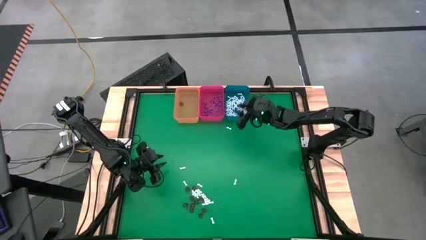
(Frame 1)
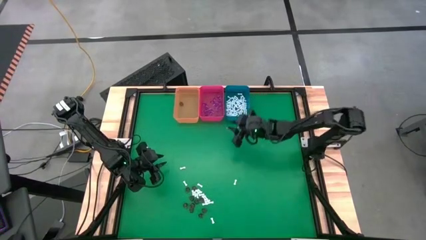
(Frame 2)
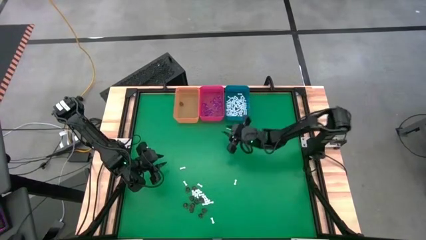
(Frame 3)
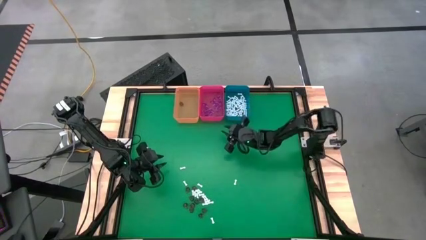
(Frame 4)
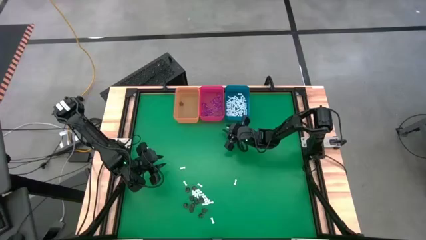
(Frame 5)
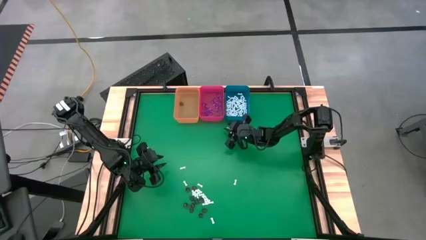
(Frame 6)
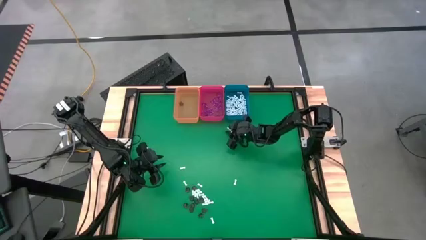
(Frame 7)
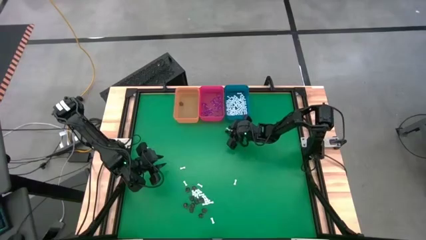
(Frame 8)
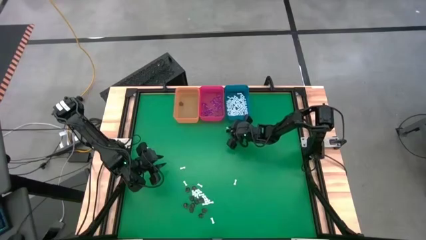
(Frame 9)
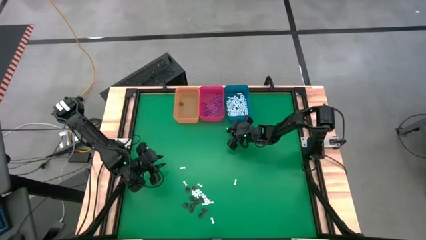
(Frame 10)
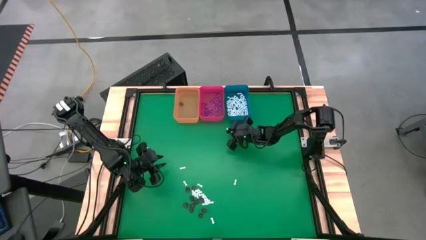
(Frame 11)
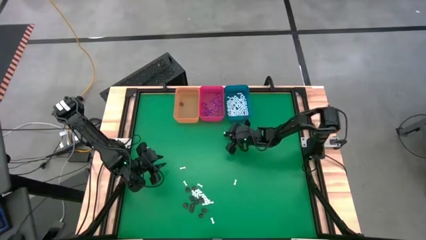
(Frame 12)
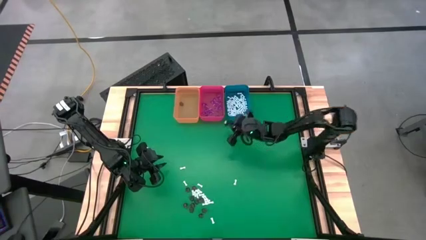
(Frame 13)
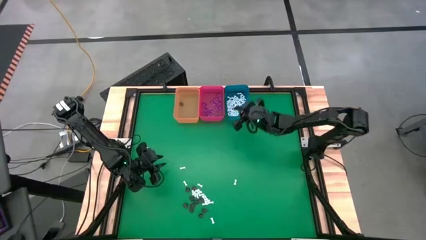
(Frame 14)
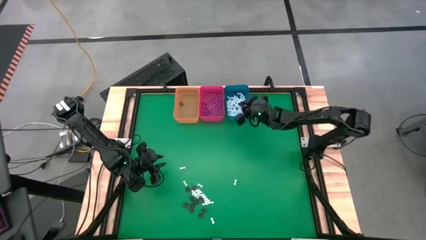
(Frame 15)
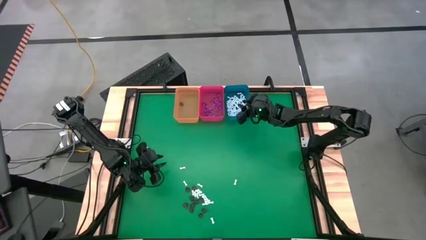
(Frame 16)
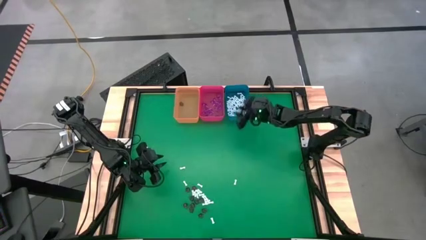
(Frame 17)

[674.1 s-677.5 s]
Task: Sort Halloween decoration
Put the white bone toy into the blue bin

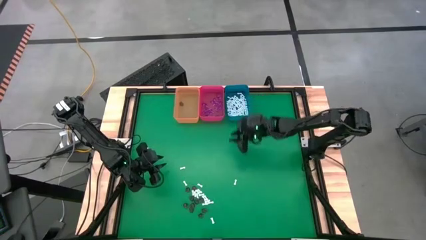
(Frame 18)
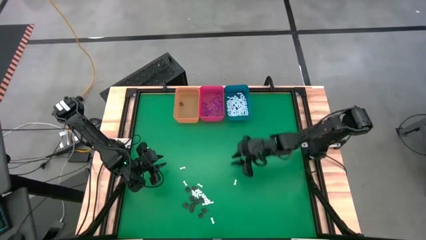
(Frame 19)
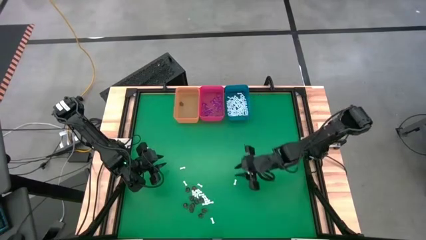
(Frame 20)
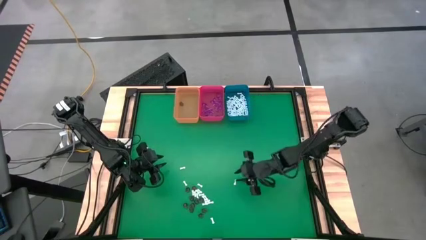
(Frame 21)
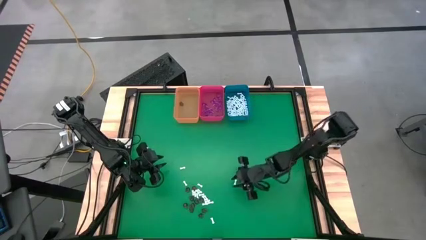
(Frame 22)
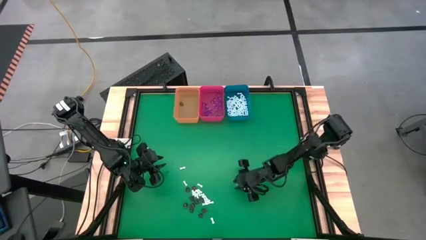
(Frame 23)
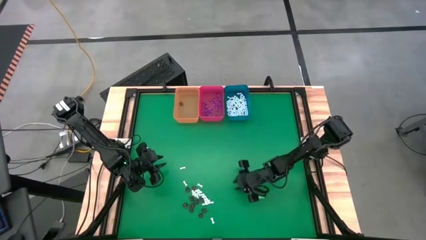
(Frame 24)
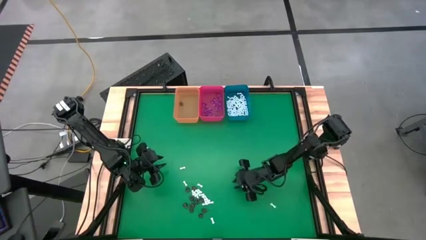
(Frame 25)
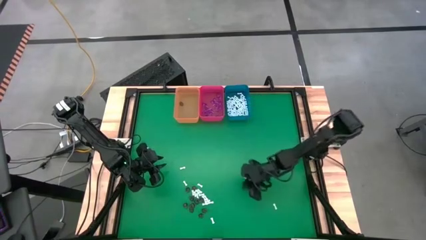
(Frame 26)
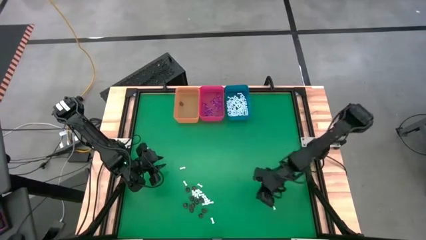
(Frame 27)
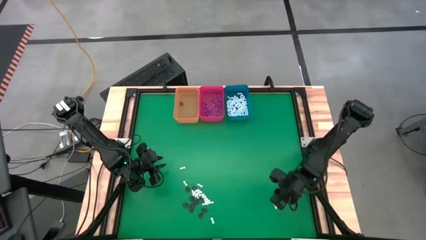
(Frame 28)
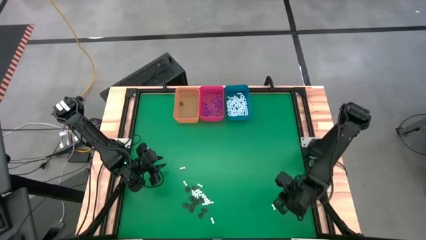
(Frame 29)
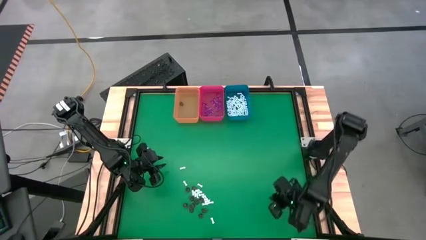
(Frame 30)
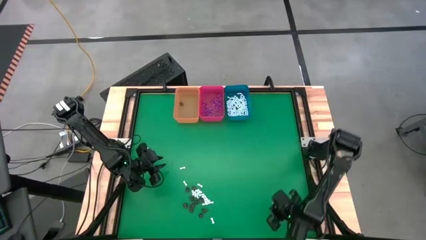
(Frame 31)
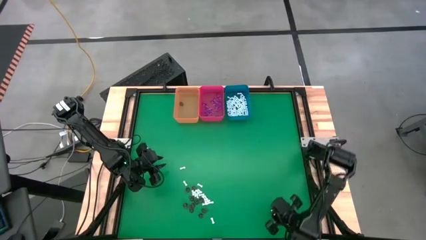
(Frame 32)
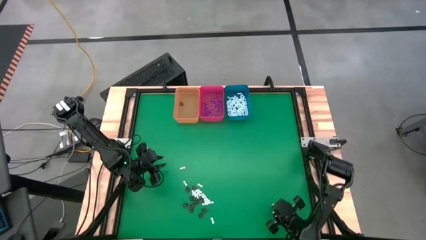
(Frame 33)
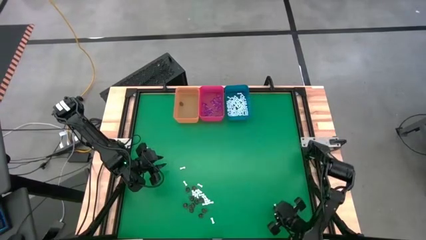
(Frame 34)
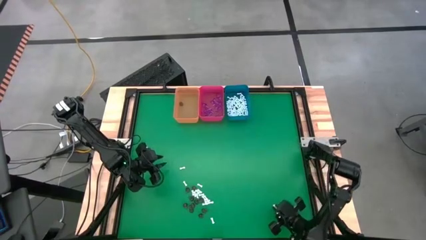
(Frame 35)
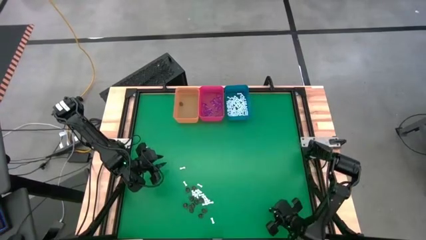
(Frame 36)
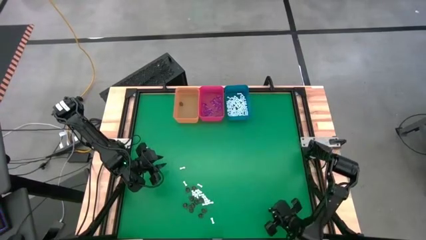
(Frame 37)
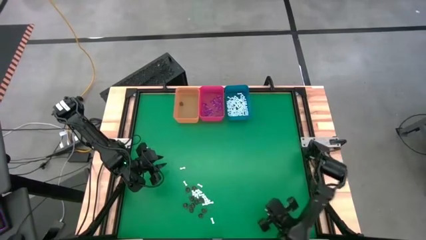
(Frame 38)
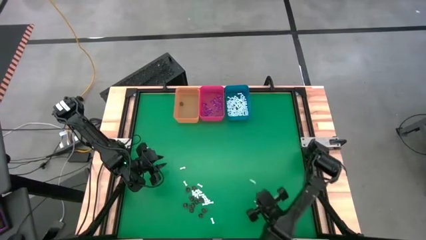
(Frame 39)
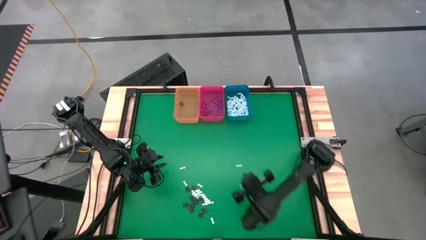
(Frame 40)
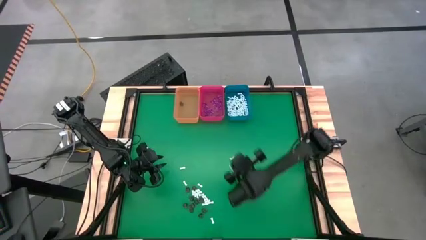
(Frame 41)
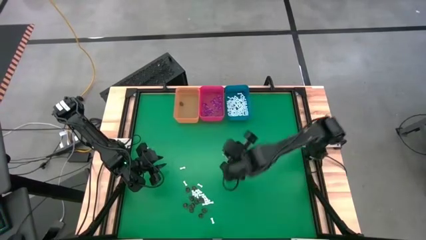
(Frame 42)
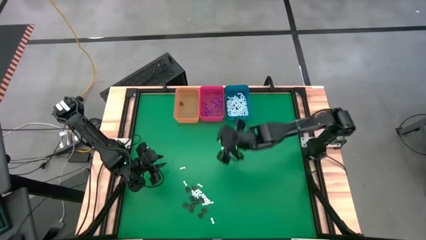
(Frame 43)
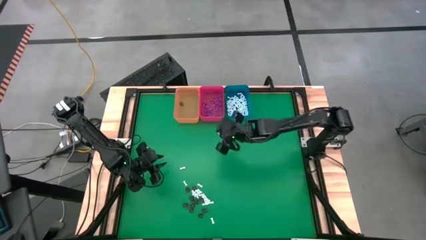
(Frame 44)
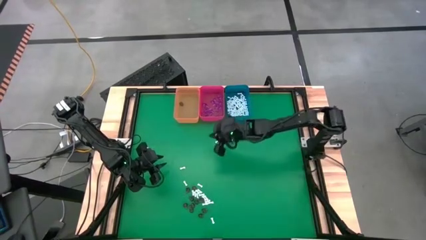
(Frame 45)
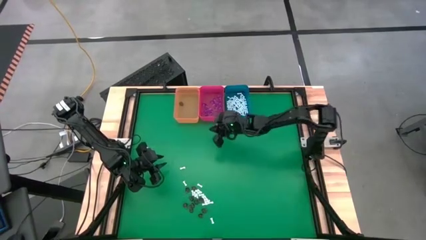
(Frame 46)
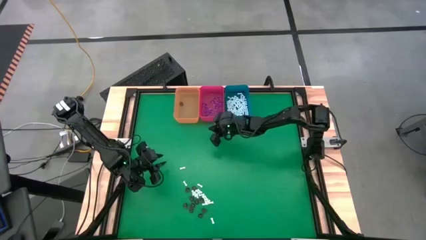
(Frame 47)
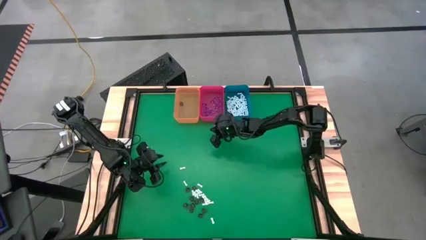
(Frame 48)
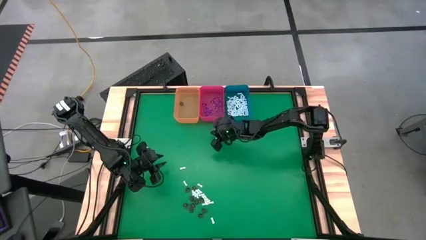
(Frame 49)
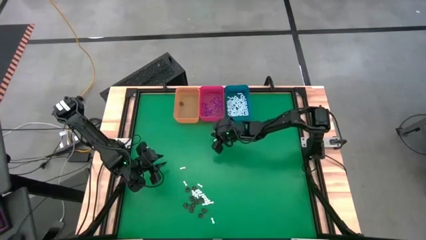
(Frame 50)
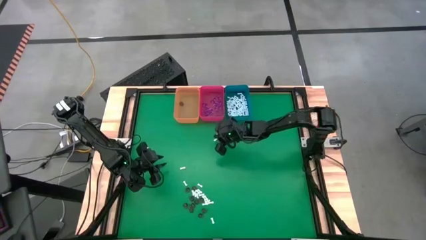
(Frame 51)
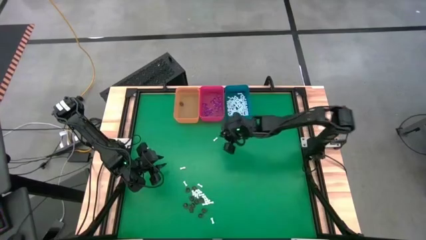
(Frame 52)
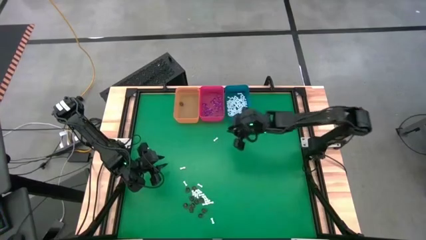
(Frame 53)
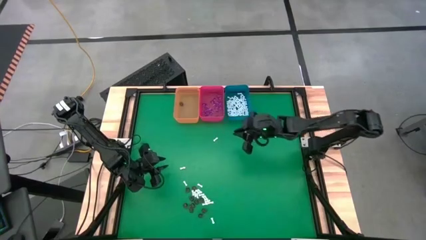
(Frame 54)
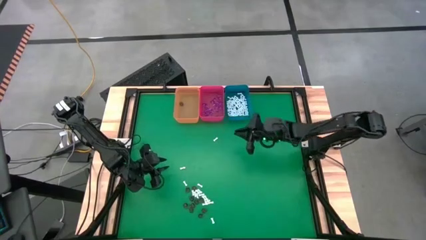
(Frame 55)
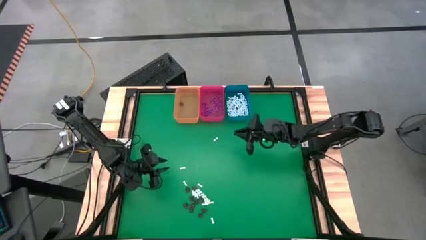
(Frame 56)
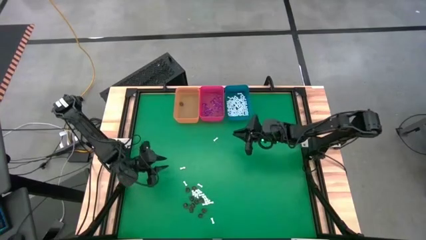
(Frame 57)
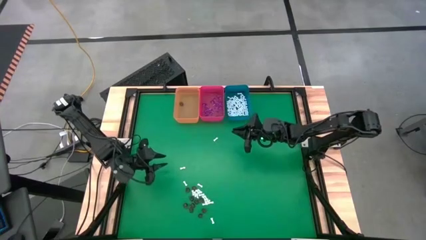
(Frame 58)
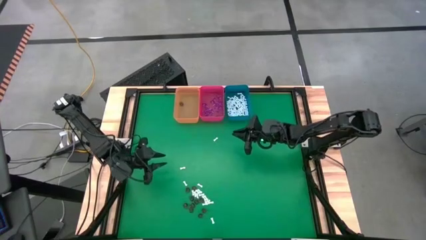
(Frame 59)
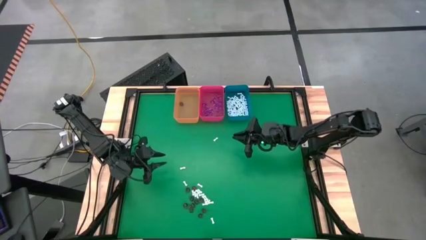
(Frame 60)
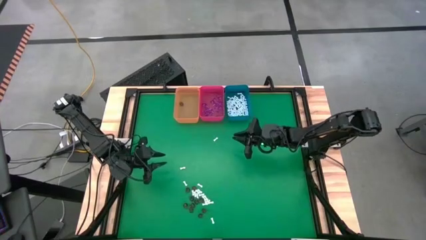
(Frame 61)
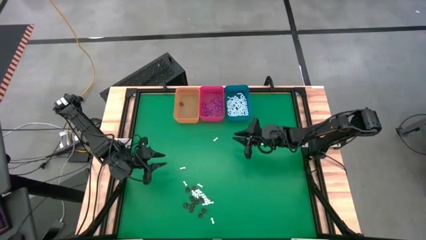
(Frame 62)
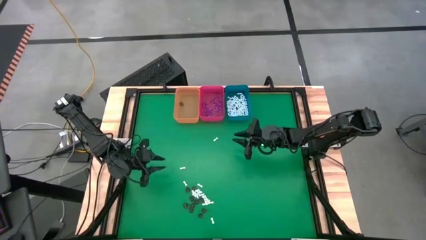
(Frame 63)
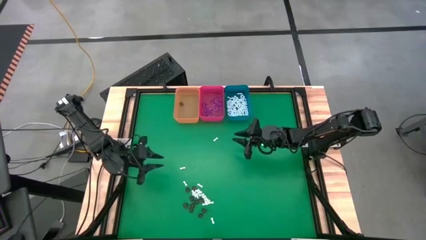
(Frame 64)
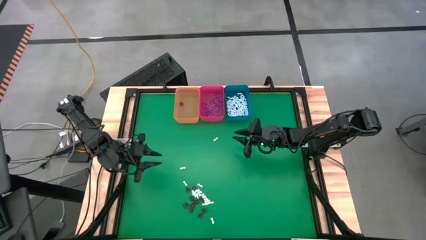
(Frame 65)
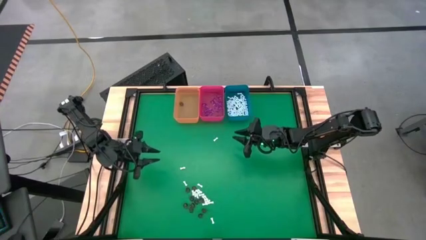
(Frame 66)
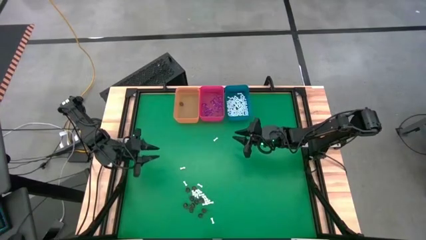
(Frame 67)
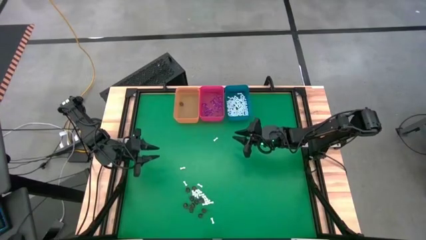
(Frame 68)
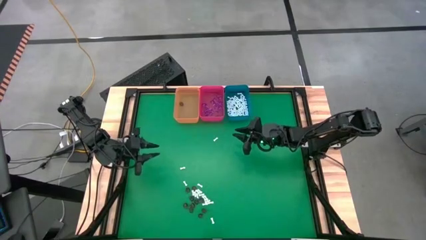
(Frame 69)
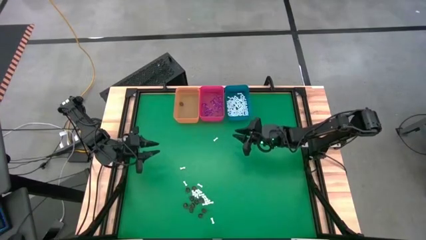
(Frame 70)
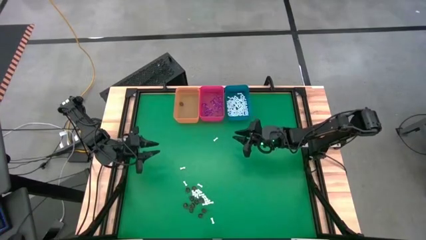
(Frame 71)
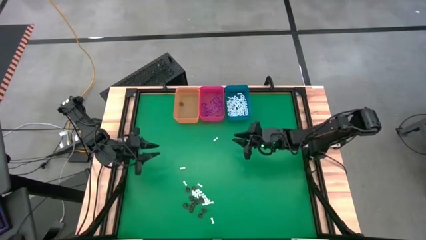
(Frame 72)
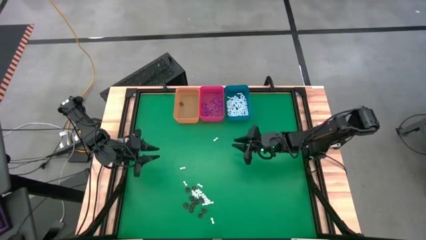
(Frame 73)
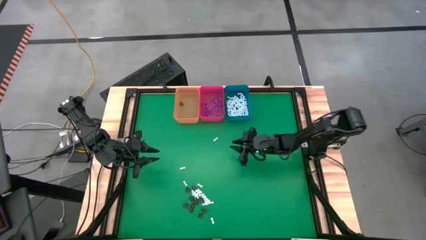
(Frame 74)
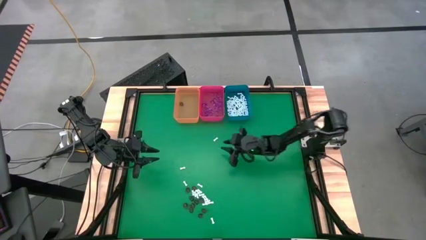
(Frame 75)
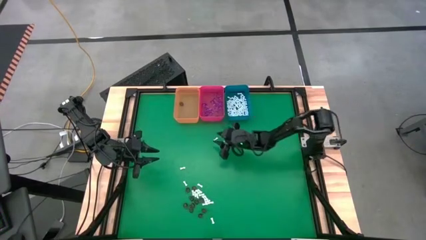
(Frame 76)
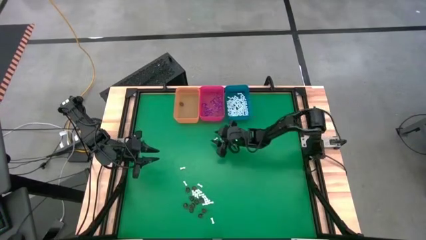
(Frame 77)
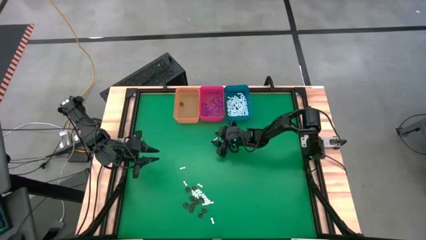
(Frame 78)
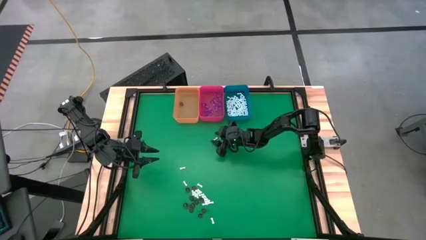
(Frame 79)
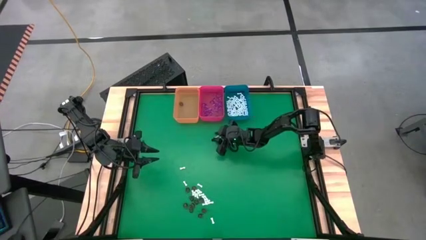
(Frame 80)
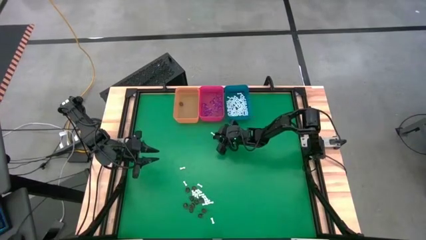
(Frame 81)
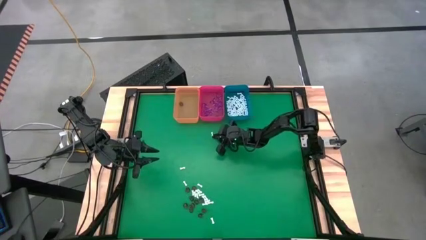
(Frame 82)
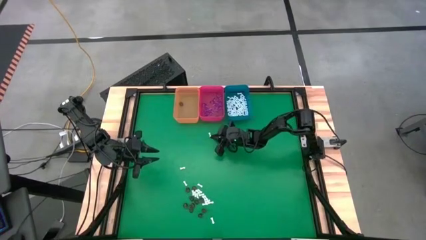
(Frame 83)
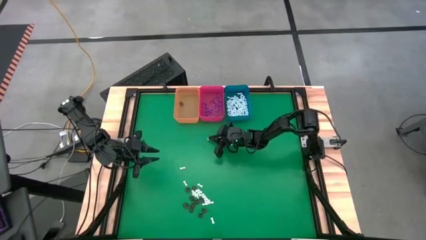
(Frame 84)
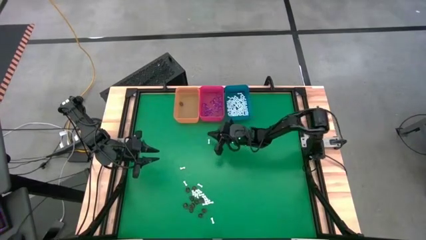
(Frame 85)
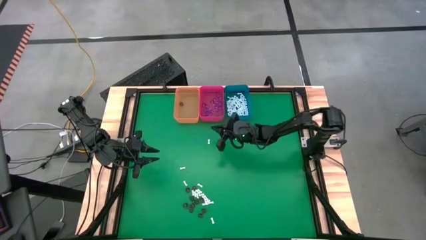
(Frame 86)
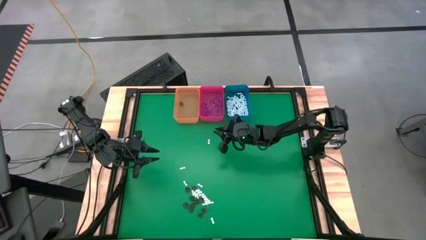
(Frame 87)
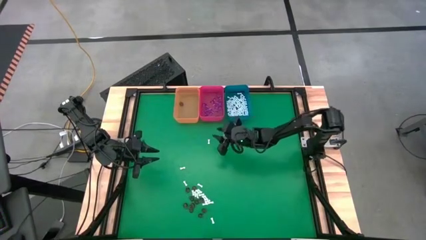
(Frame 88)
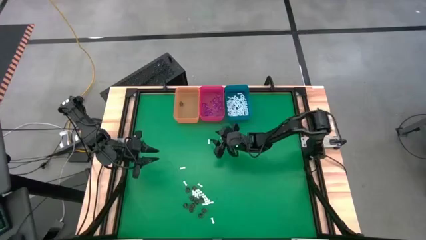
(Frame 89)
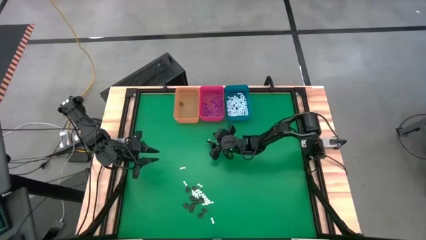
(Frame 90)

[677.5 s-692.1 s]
Put the white bone toy into the blue bin
